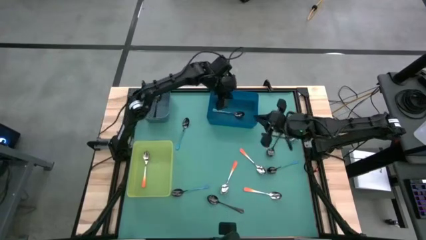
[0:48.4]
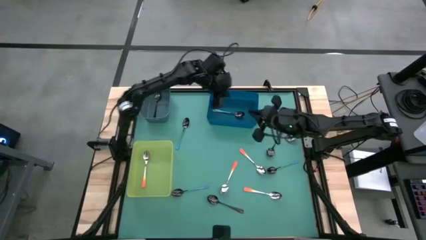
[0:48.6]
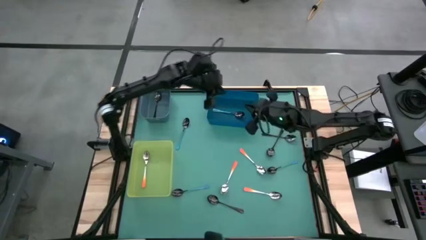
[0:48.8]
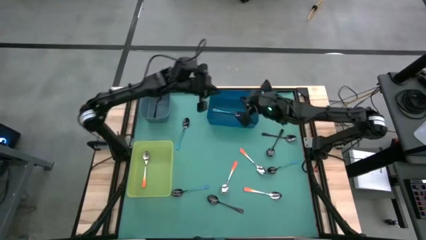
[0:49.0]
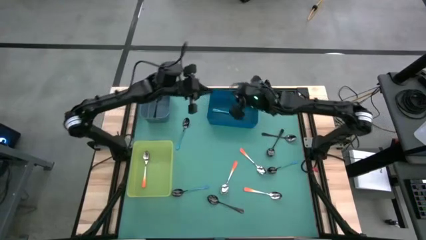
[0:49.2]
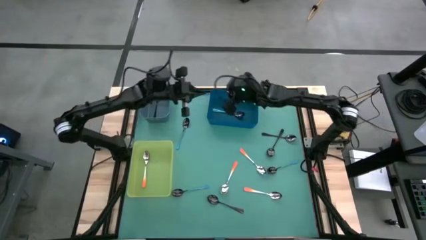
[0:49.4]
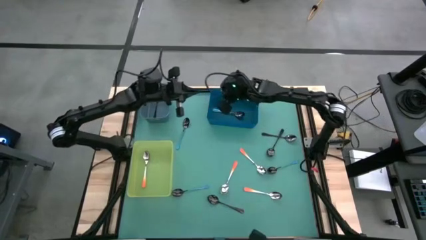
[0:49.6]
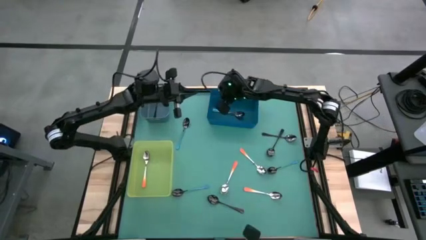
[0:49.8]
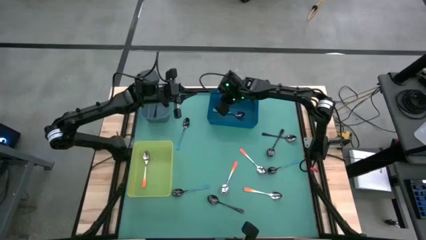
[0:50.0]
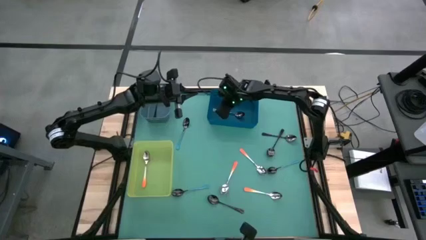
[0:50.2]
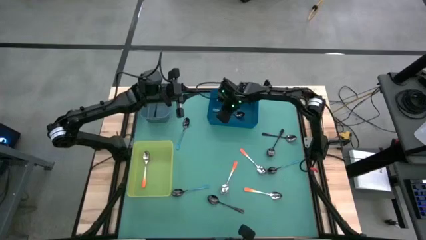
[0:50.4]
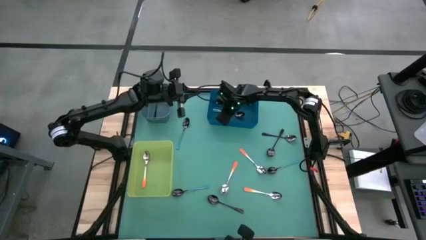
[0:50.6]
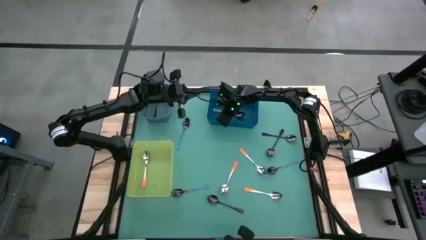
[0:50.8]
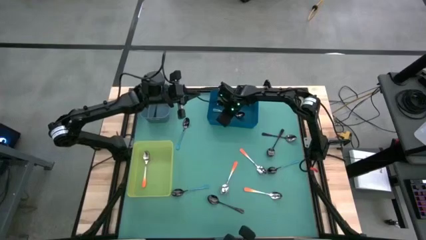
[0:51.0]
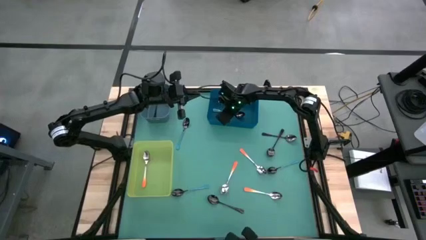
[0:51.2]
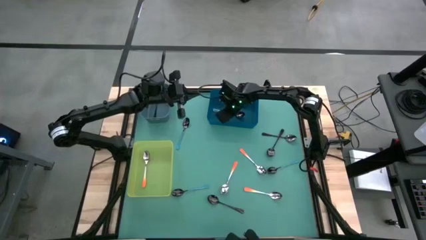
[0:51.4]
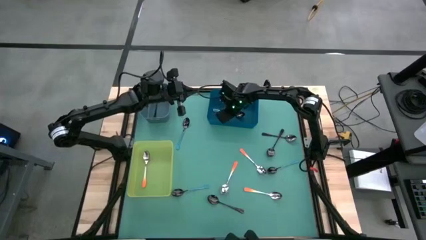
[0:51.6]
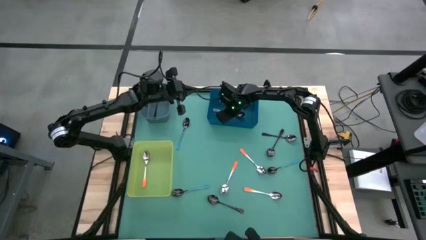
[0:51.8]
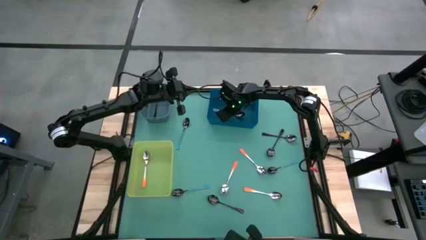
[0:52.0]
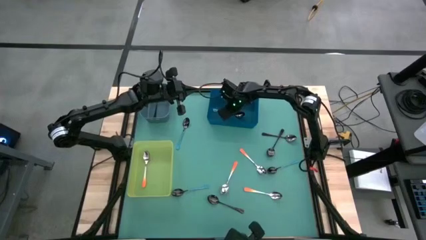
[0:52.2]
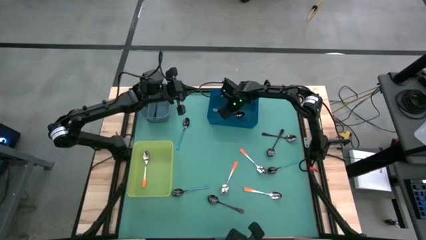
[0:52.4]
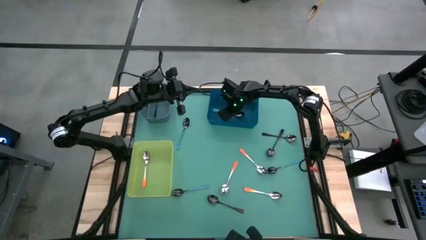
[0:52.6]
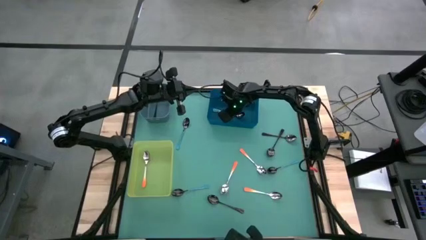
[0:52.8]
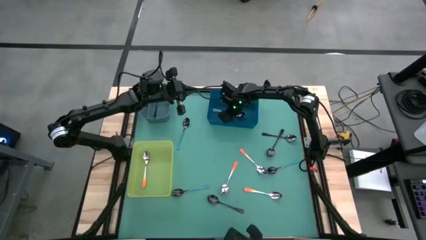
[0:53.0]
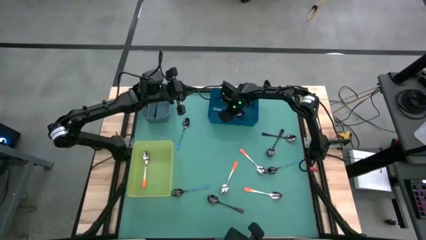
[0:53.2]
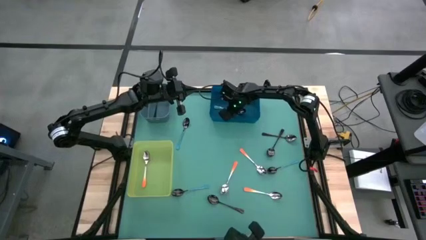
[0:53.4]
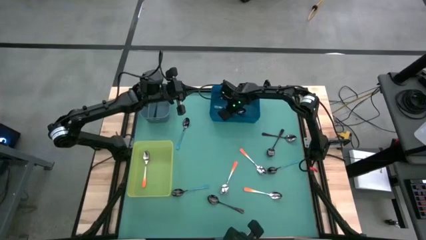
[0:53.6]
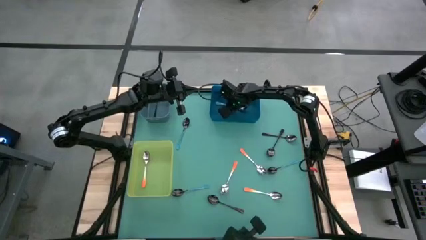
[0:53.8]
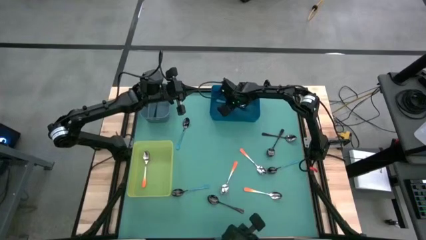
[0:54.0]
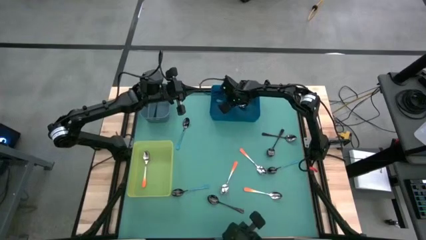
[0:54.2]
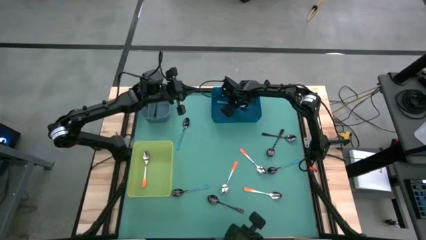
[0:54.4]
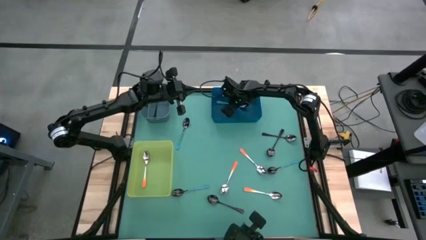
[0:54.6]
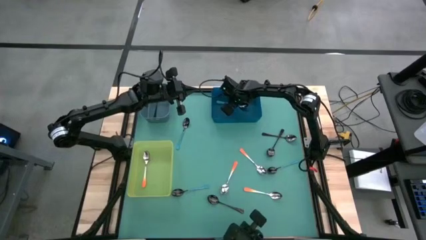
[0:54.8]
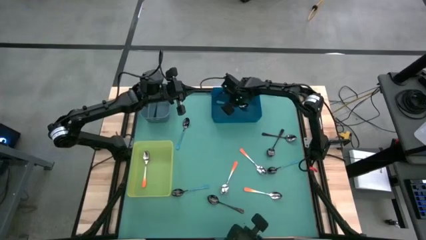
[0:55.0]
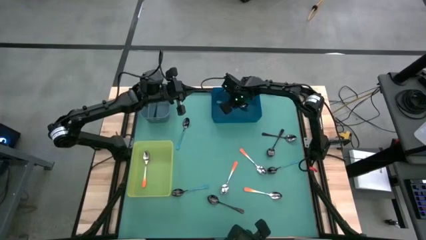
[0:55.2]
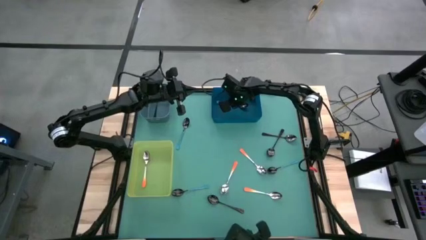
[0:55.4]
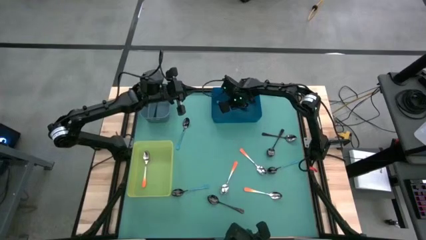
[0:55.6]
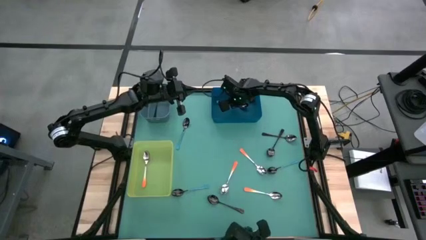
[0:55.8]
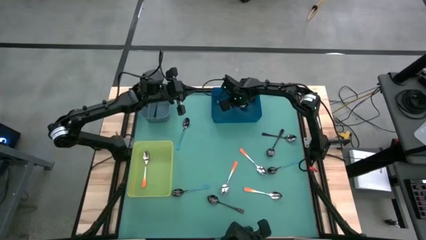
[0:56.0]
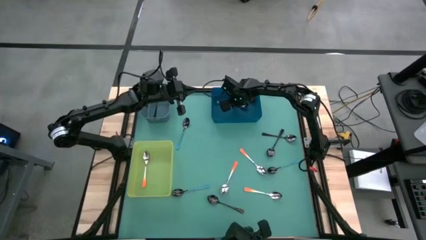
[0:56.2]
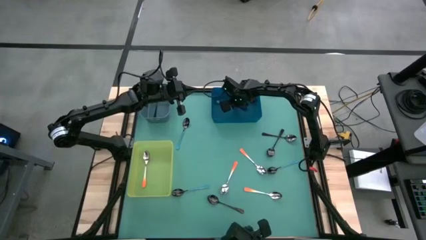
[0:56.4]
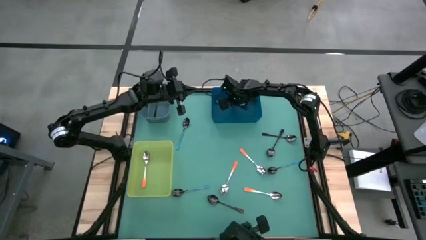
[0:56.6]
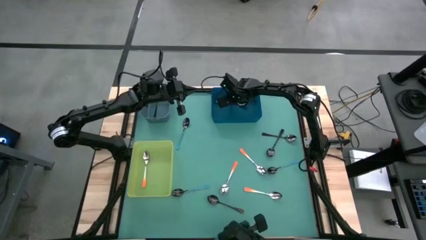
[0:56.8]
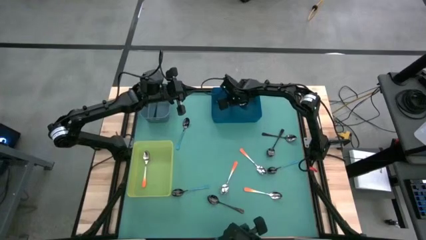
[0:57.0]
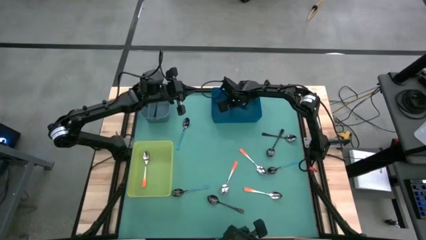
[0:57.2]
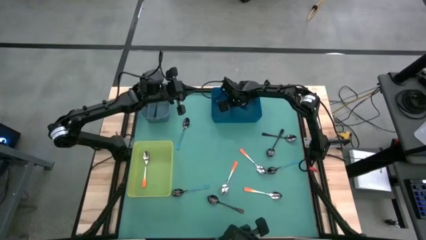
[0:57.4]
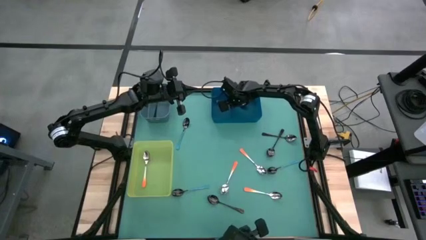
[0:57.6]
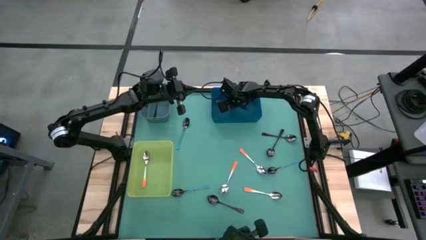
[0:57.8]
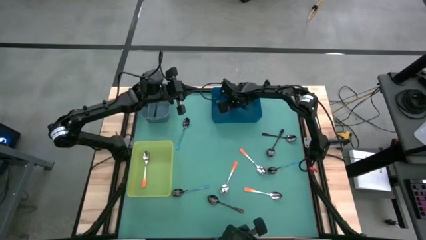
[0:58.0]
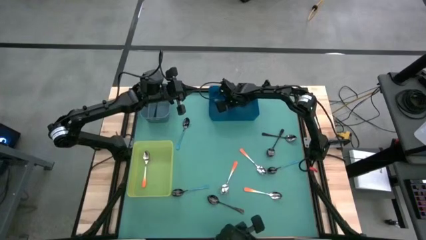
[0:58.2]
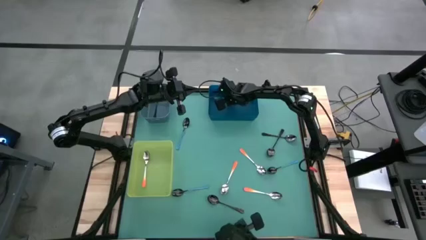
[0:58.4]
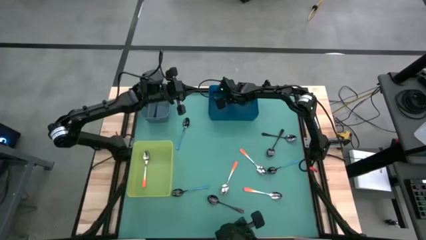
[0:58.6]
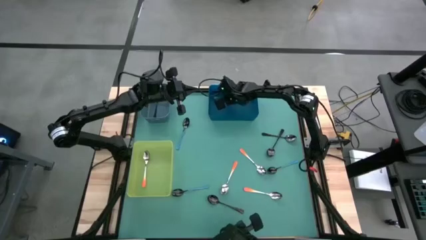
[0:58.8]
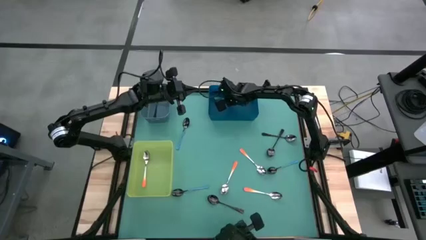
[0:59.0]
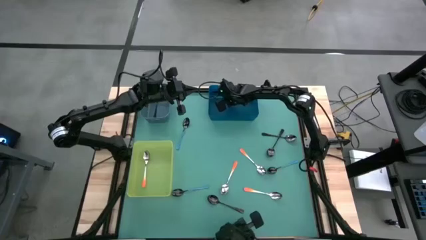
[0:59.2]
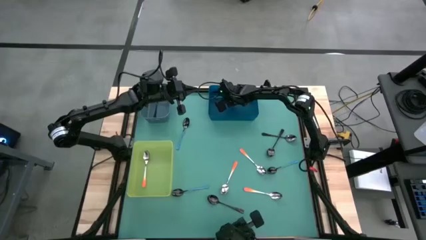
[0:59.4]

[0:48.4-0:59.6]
Task: Sort silverware by color (type)
Put the blue spoon into the dark blue bin
